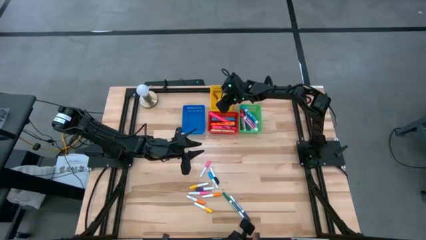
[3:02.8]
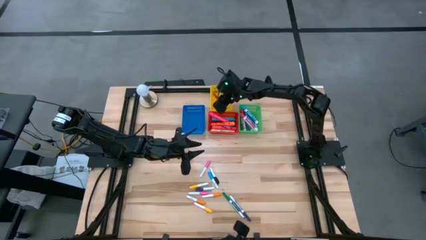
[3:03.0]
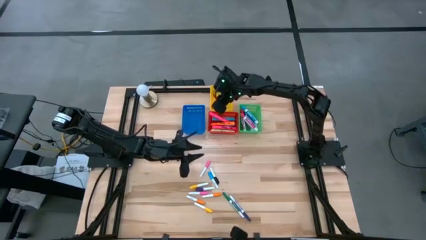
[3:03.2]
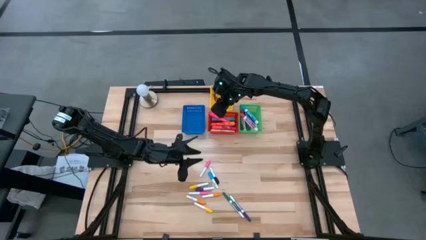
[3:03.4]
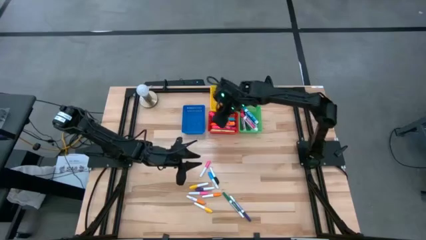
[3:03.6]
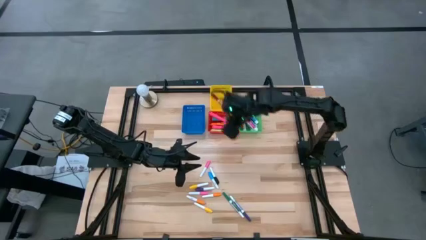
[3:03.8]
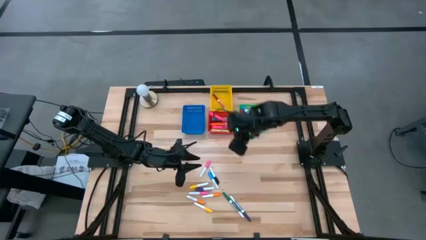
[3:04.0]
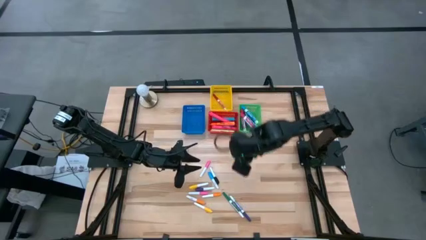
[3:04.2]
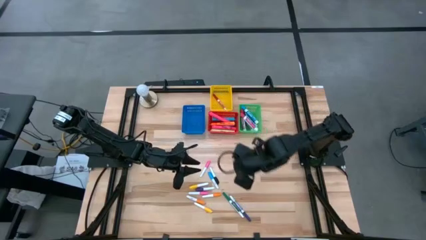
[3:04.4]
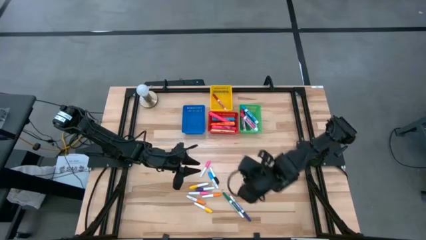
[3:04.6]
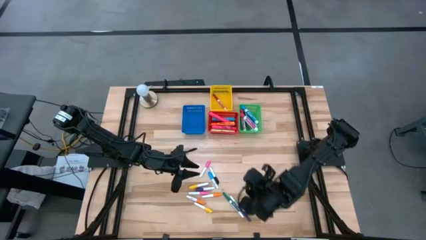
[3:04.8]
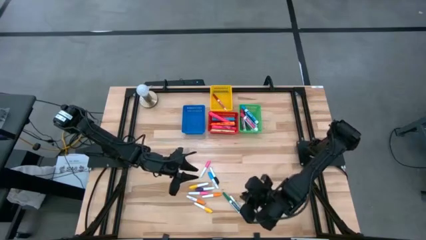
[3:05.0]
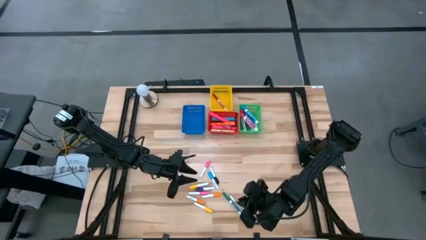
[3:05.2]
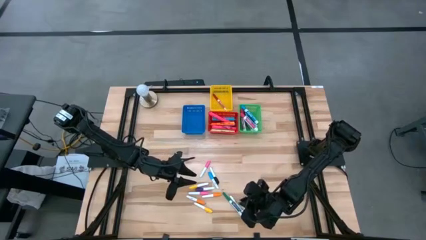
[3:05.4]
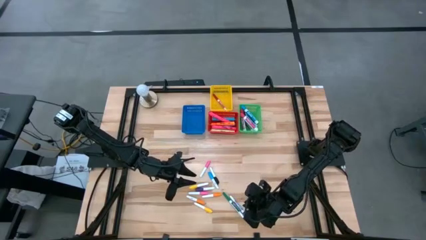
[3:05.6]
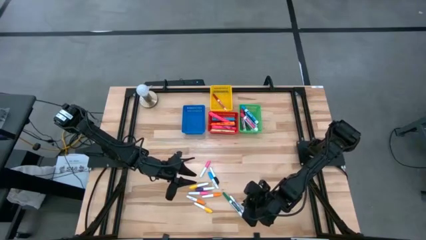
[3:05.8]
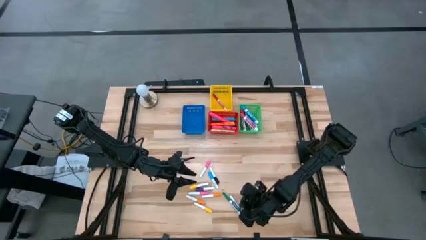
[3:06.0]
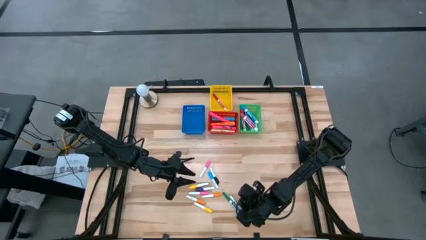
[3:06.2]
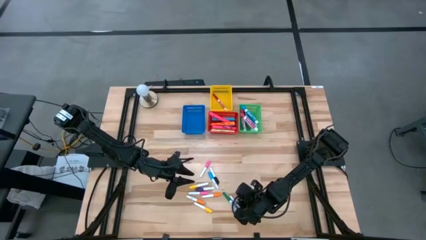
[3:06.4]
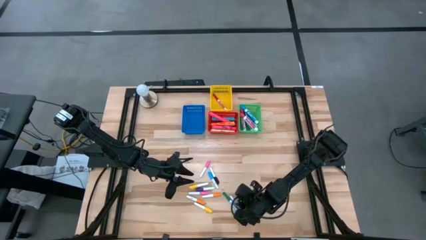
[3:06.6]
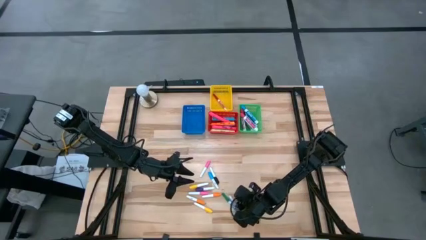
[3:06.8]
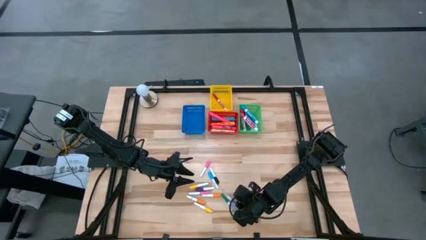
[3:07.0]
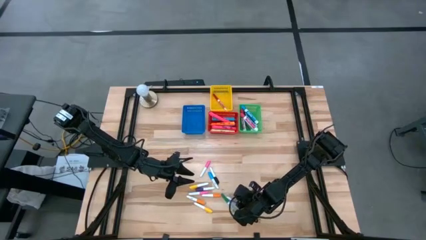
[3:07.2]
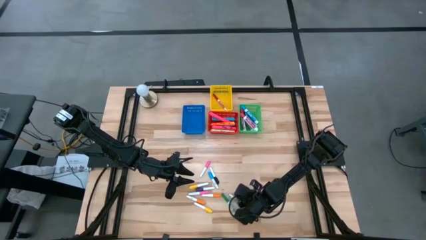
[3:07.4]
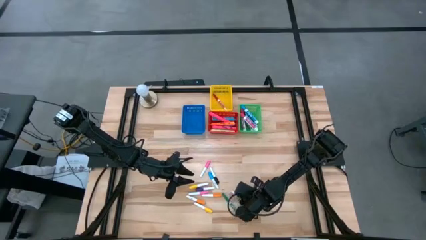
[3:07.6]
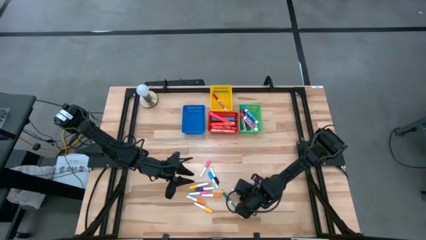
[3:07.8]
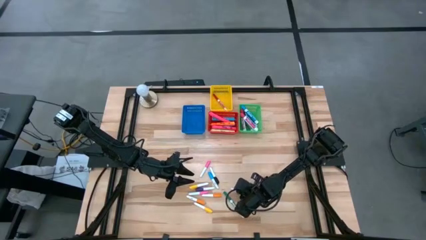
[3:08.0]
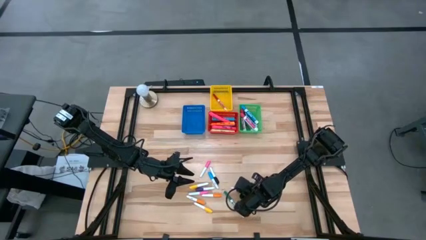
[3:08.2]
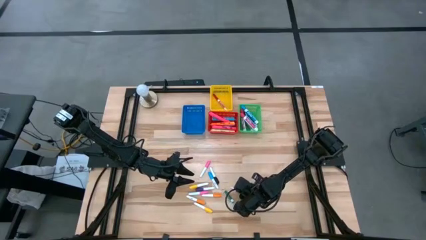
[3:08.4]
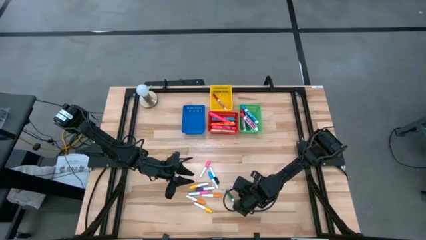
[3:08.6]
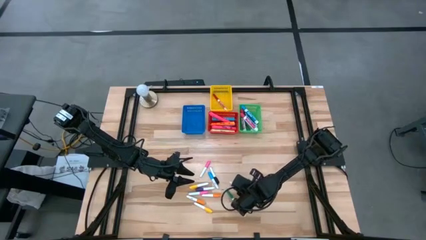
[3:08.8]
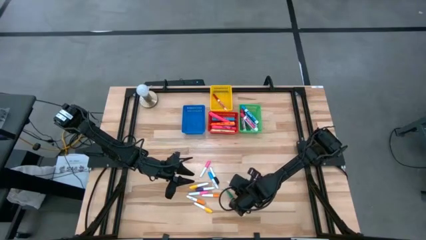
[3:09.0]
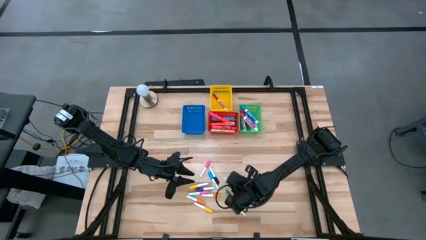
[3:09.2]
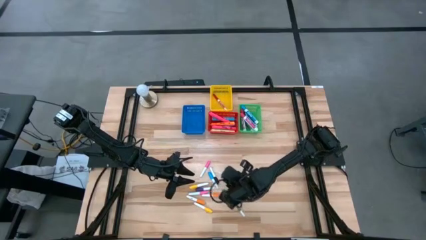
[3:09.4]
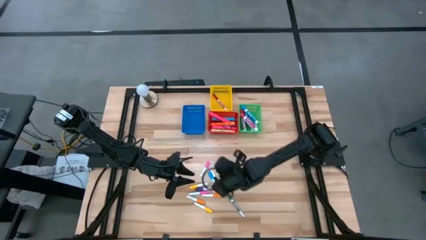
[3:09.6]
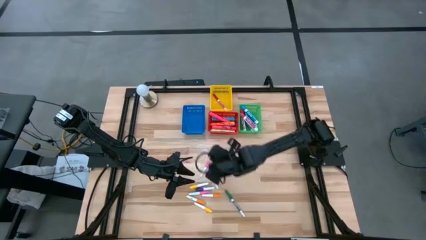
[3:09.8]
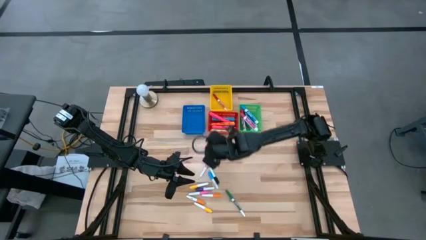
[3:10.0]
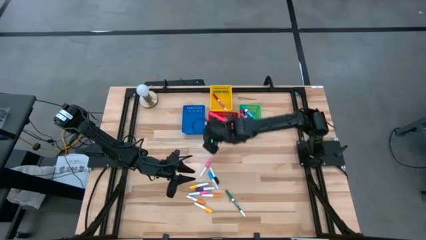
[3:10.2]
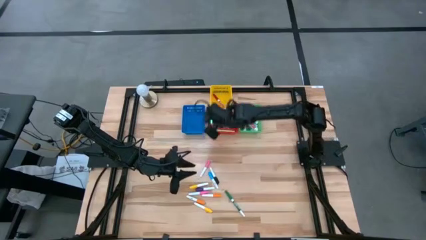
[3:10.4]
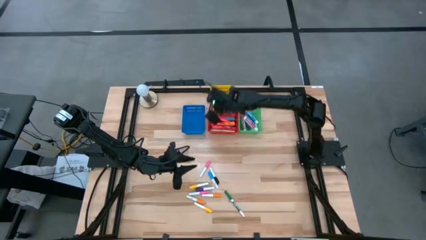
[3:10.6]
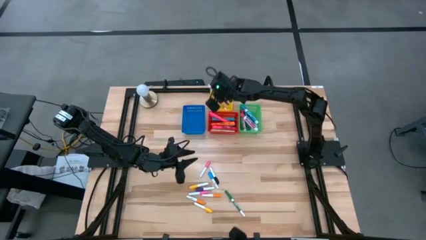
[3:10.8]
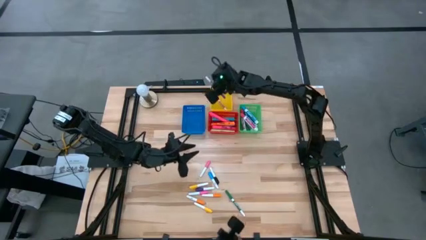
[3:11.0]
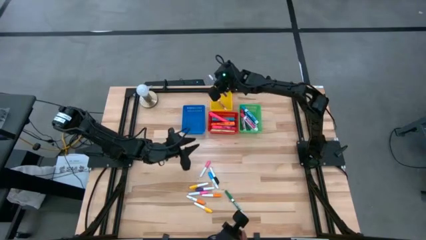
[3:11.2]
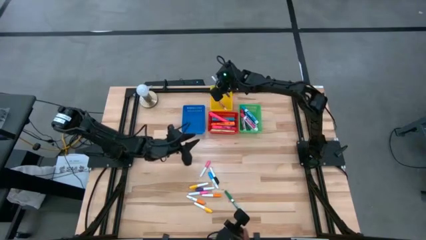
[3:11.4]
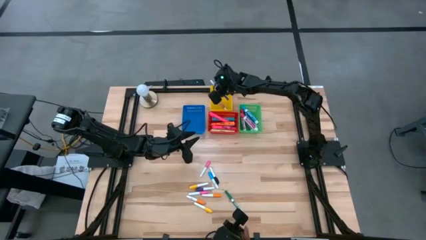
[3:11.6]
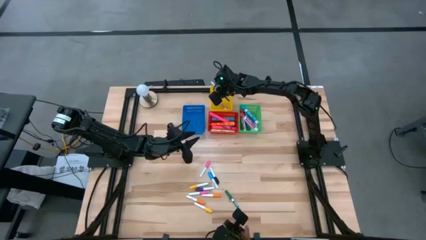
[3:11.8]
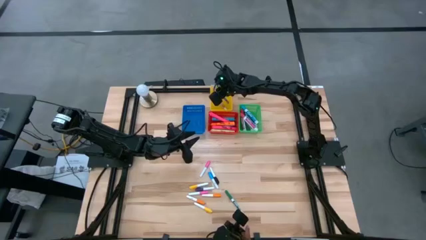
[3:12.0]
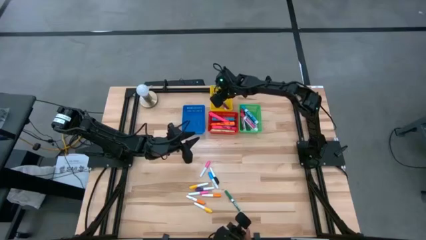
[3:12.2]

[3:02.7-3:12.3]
Task: Pick & Place Markers
Put the small blue marker pen into the yellow bin

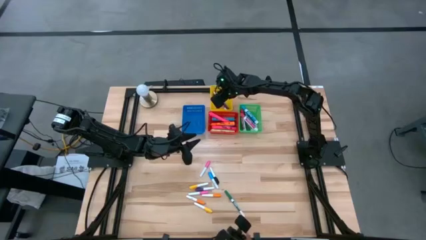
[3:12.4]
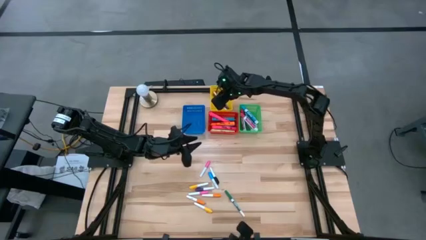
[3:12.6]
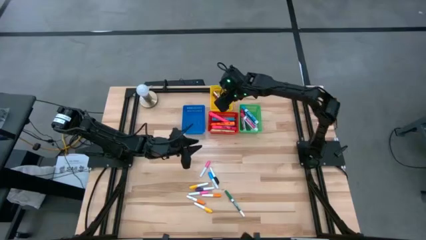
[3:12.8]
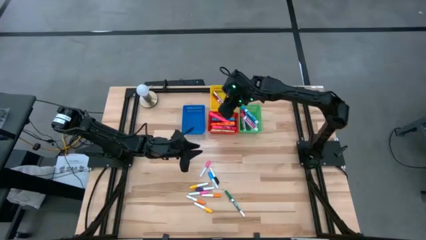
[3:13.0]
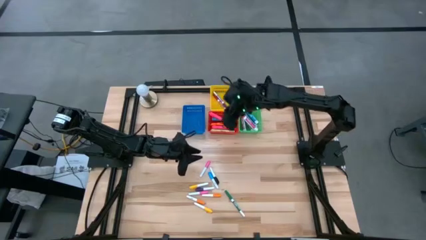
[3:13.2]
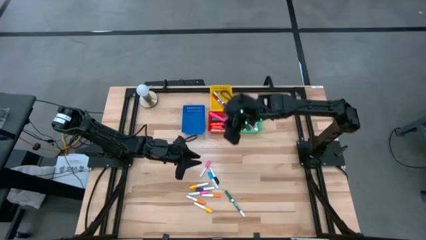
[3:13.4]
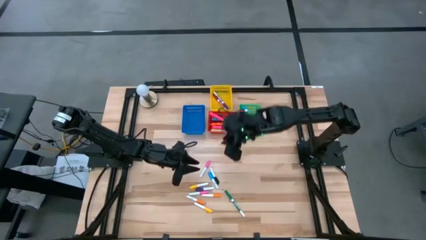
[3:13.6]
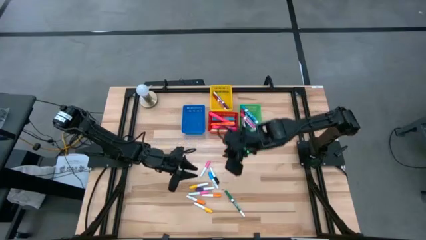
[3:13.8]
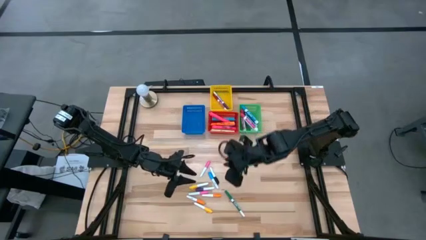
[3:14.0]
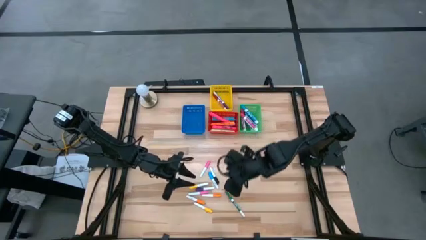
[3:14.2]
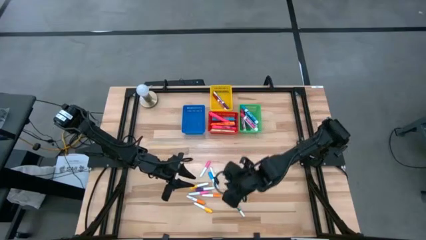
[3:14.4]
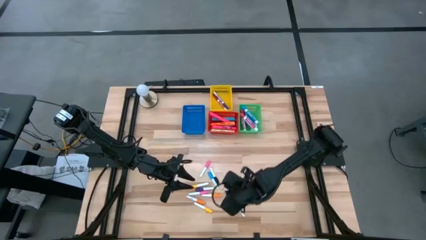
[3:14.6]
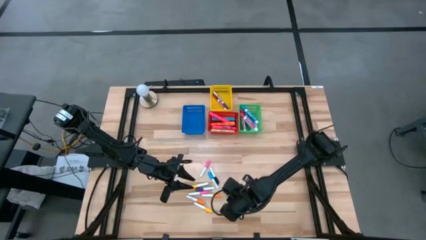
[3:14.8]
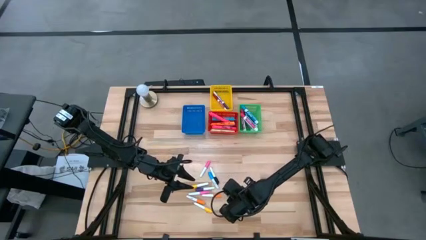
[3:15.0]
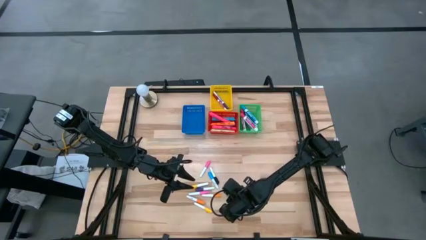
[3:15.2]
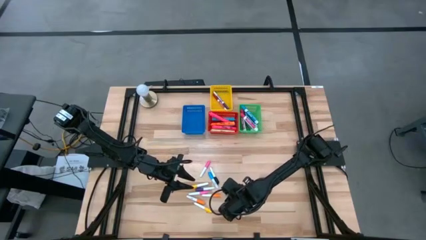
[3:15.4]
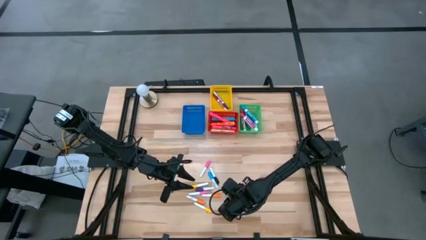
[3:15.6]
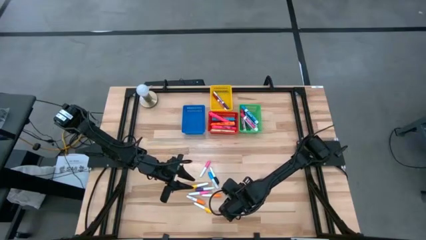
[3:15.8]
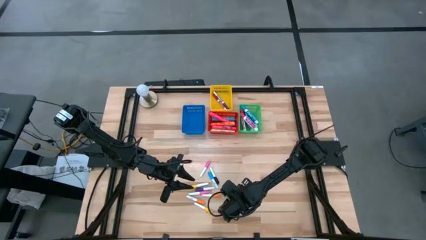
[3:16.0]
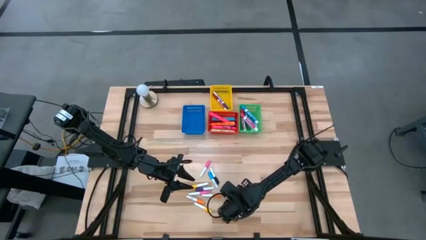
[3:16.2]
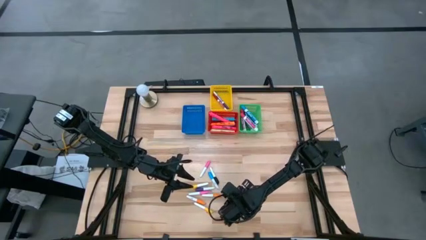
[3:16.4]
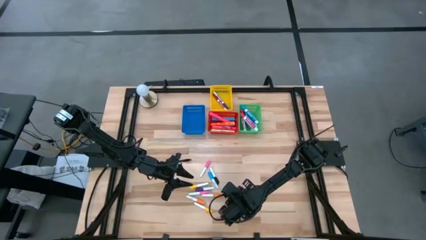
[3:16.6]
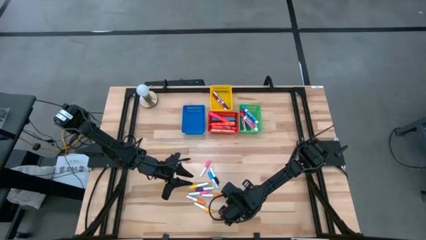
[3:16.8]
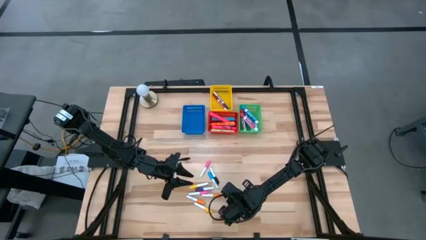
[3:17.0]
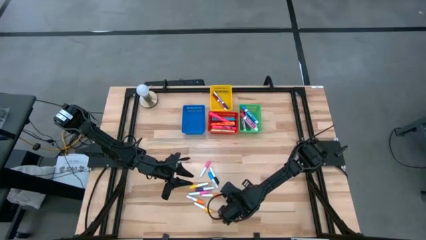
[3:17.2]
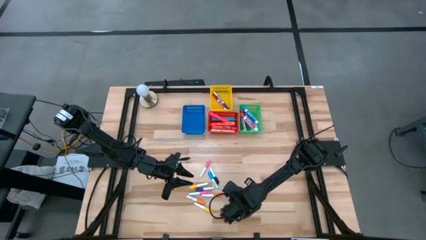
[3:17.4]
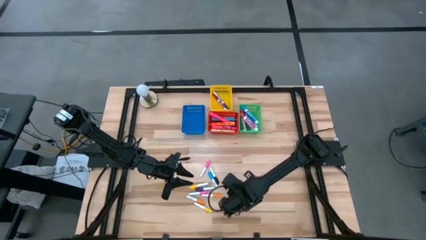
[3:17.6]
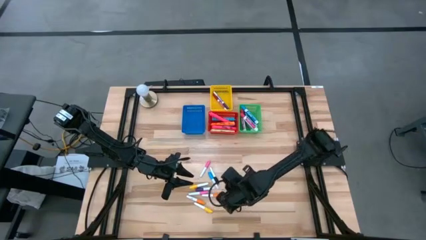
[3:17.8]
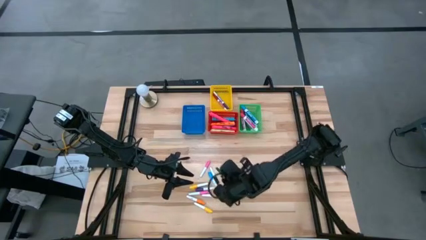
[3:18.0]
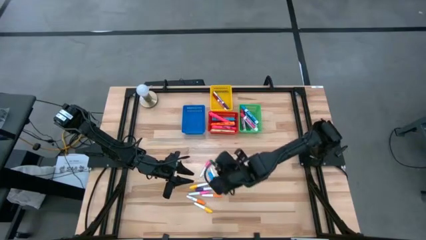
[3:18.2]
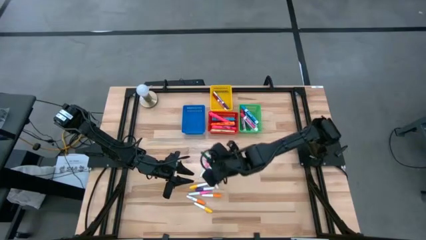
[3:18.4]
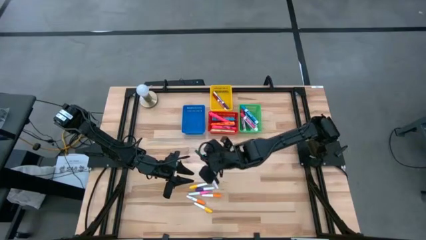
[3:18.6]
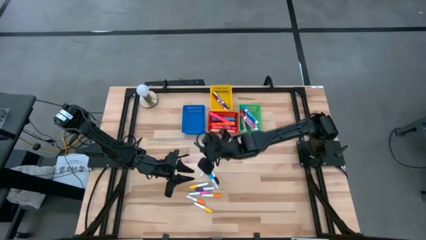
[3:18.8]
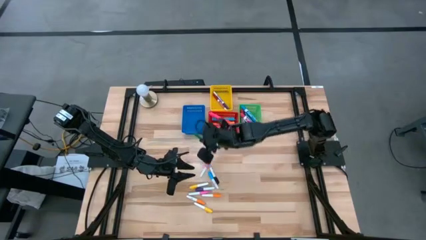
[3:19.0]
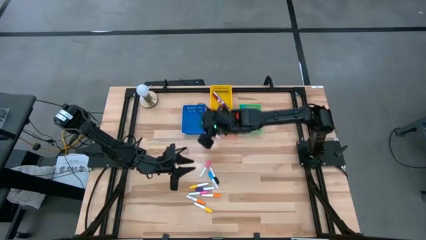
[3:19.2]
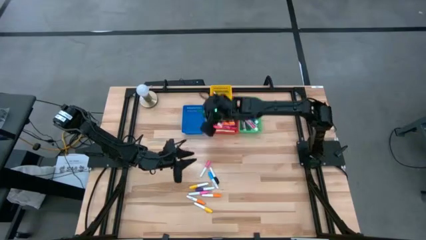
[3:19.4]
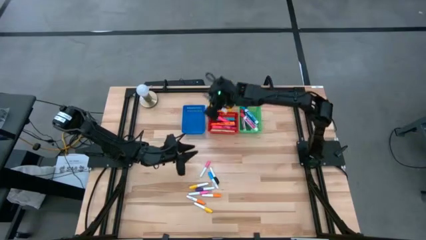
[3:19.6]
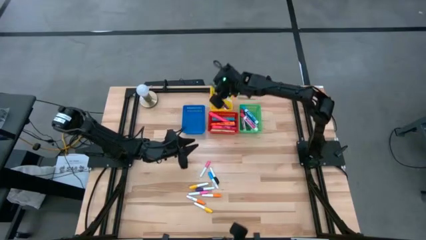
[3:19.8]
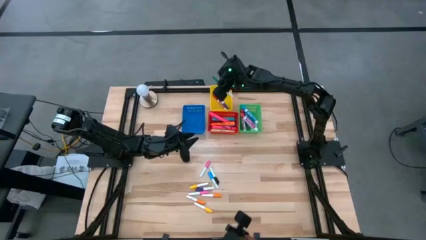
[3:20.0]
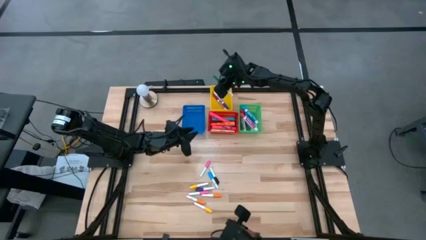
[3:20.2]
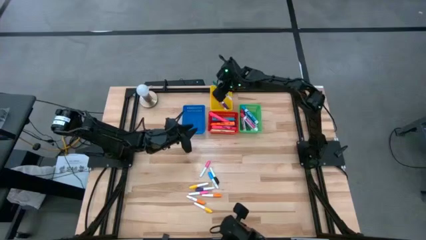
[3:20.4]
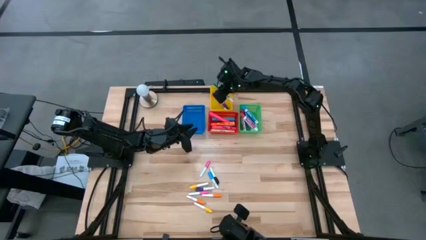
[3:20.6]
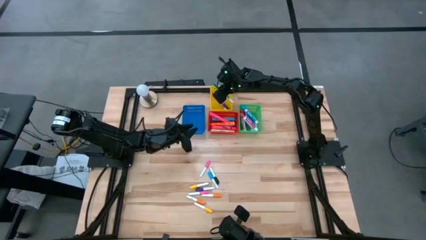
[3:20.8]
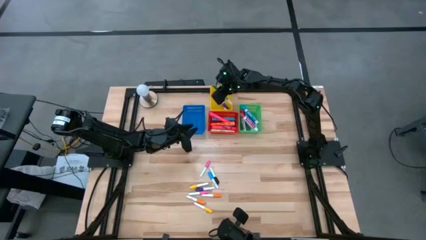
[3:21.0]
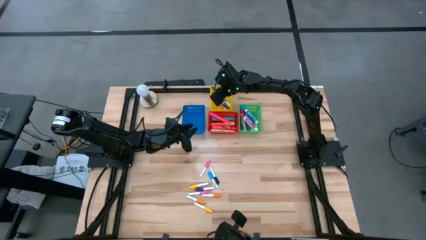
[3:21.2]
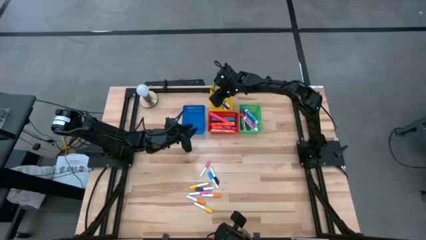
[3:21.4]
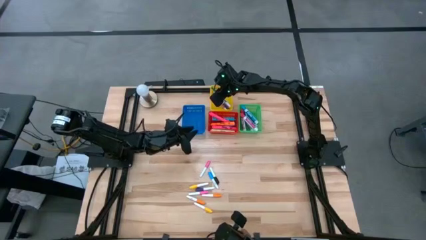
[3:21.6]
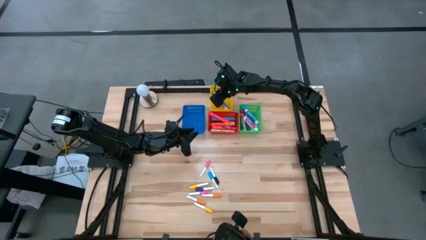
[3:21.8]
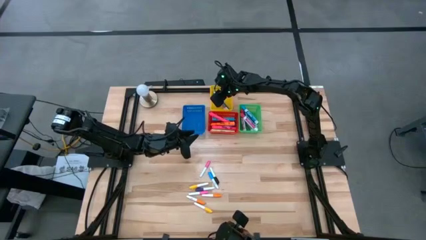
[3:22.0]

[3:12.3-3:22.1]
Put the small green marker pen into the yellow bin
